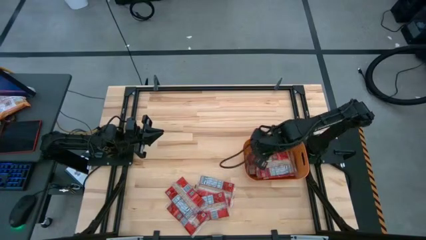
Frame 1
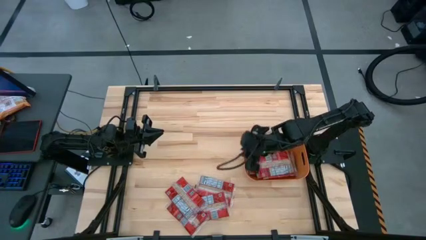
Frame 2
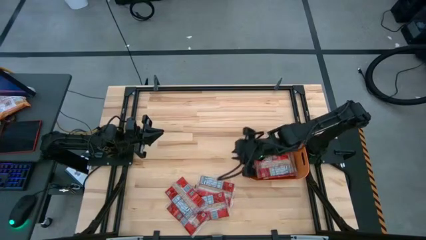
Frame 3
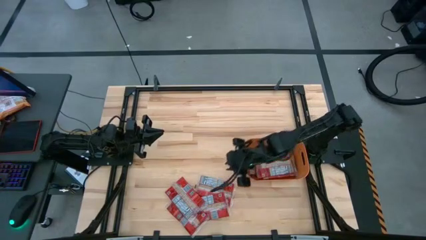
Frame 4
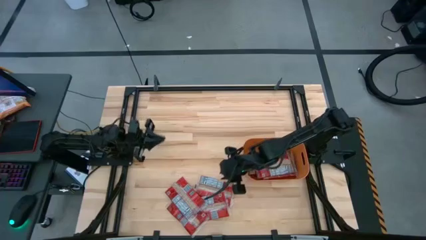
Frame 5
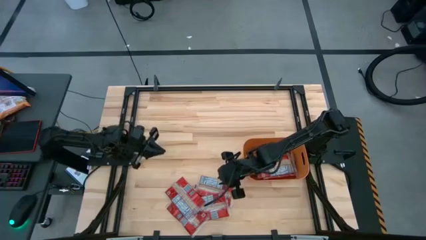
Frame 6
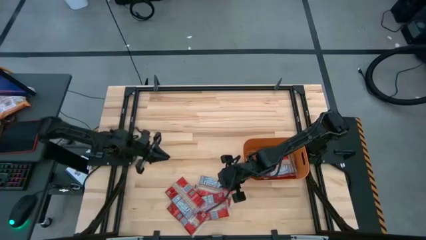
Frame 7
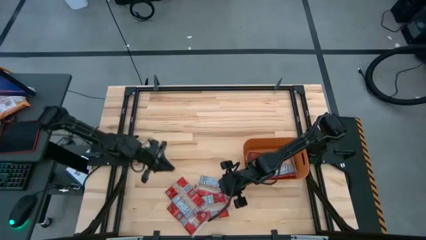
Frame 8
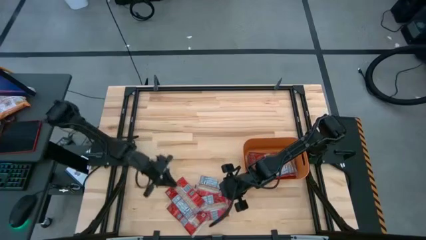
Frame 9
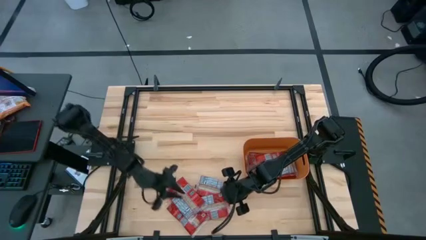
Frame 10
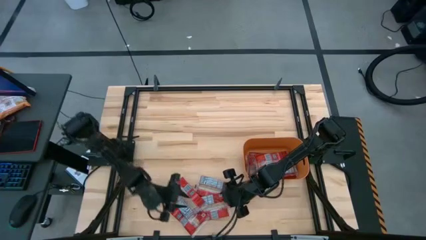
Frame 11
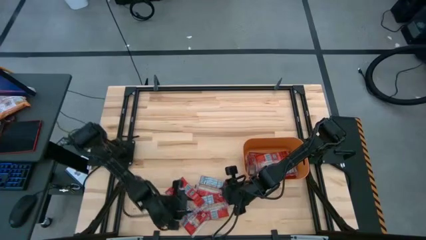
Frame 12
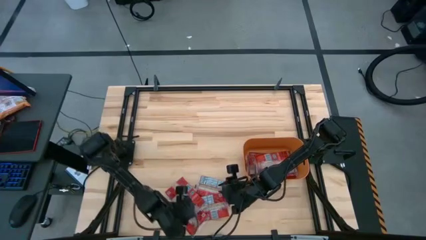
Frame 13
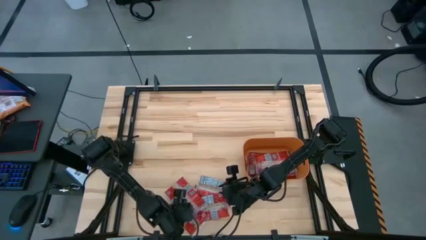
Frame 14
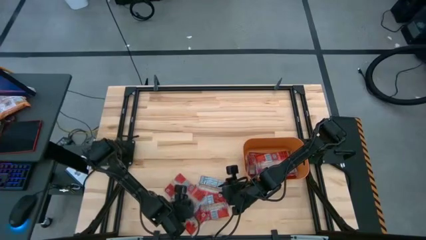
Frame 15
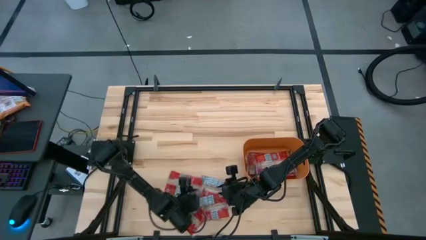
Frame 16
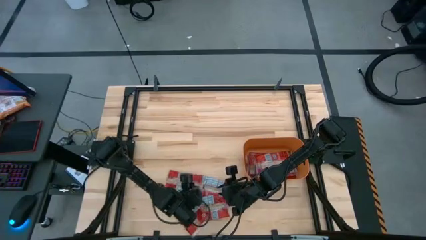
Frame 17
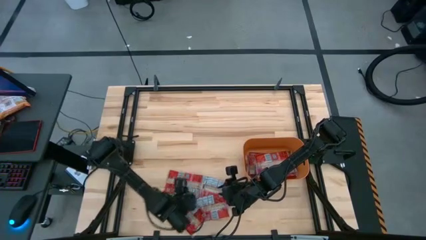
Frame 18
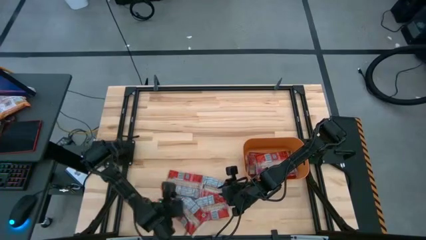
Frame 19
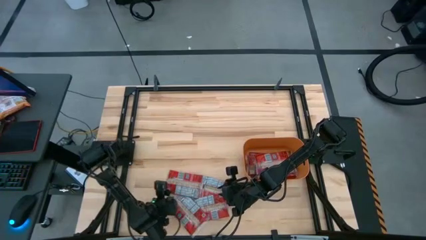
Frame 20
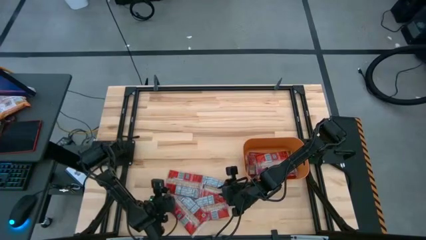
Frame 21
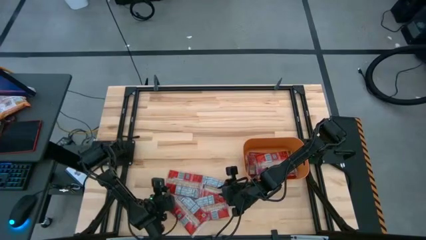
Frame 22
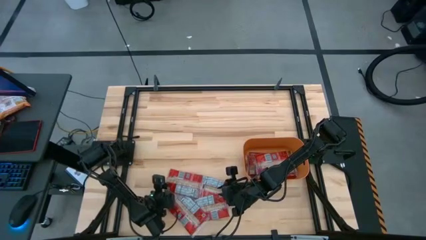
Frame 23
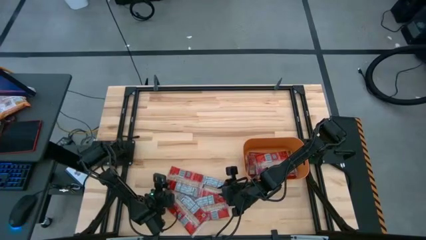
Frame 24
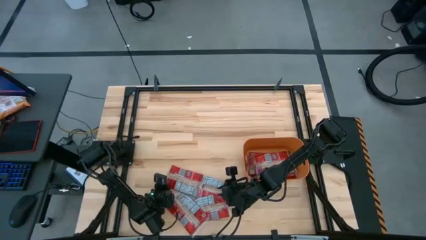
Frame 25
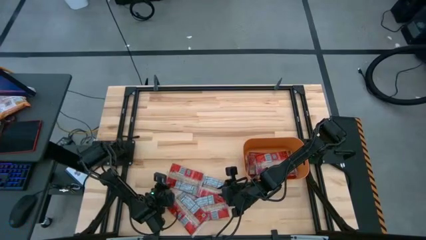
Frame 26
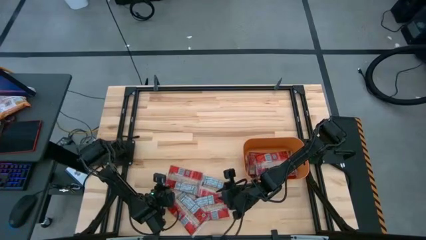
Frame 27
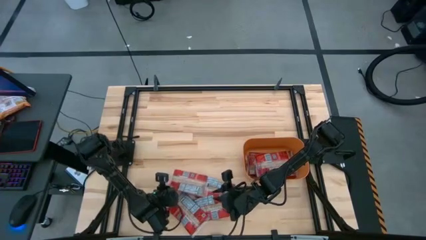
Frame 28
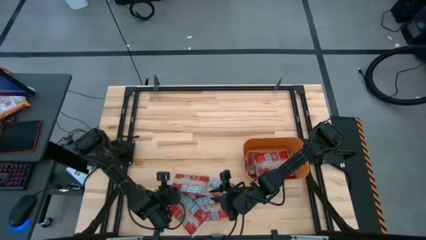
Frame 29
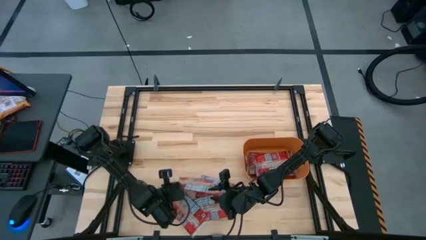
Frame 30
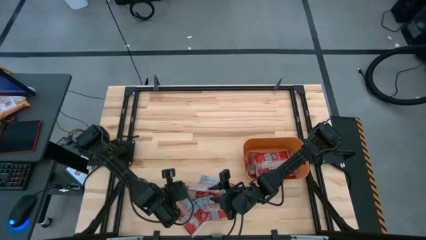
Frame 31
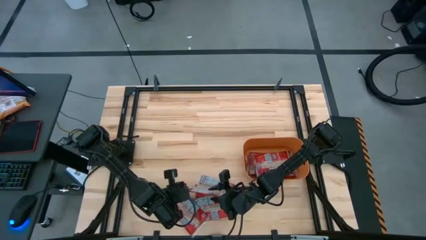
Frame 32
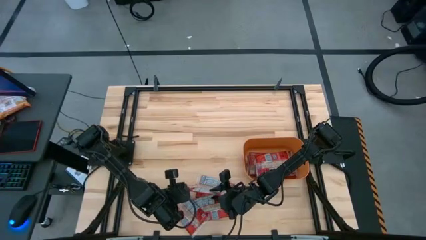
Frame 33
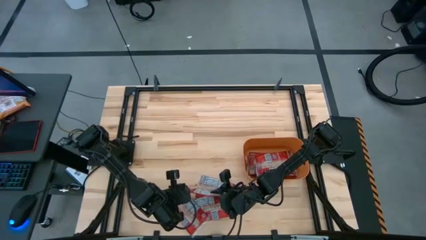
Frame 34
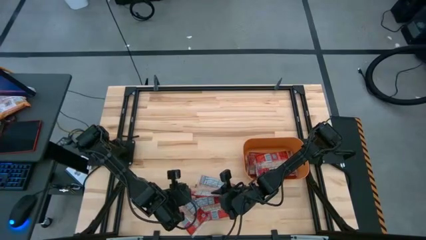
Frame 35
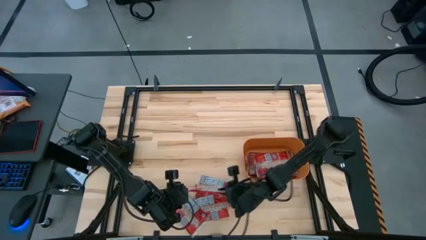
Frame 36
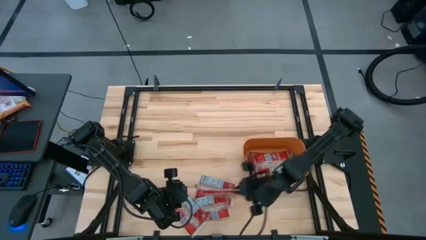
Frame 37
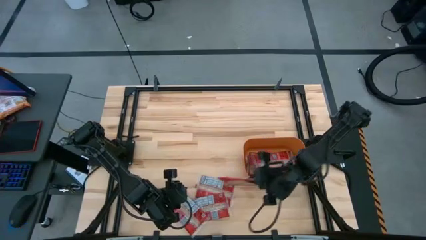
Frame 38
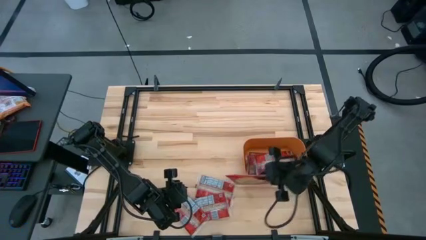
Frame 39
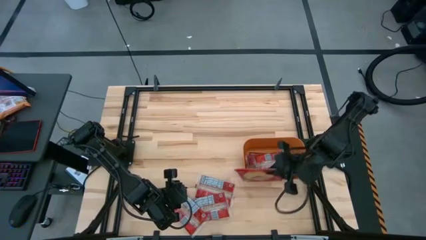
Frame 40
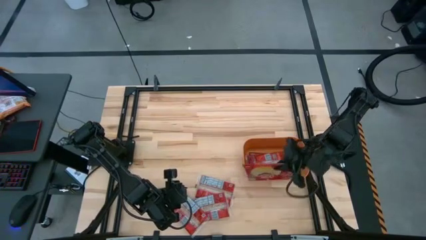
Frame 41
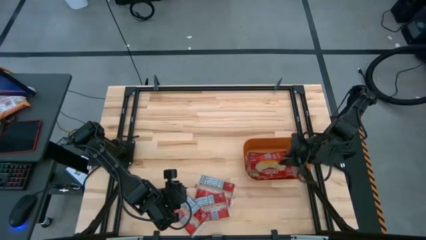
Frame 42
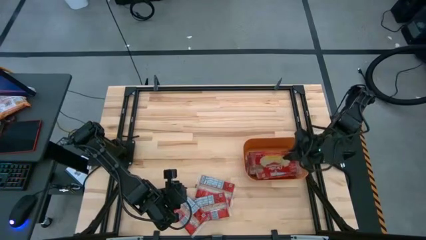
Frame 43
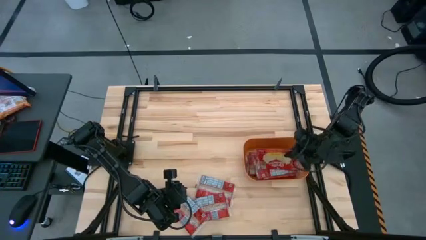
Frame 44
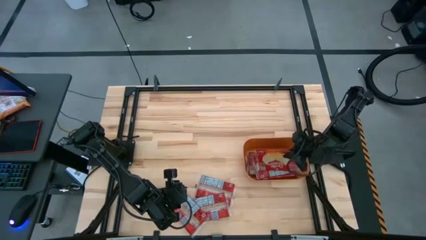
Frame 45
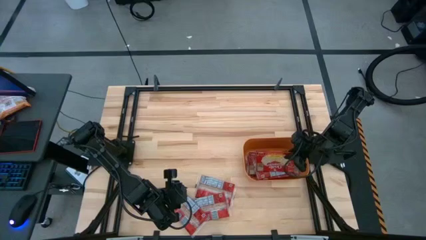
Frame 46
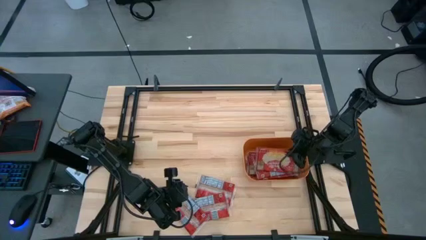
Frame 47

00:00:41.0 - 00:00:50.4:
Task: Sort popcorn bags into baskets
Put the popcorn bag into the orange bin

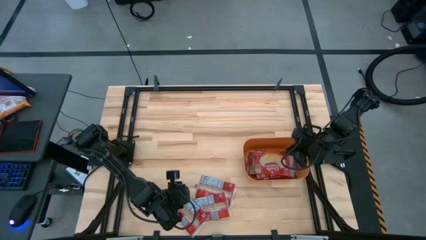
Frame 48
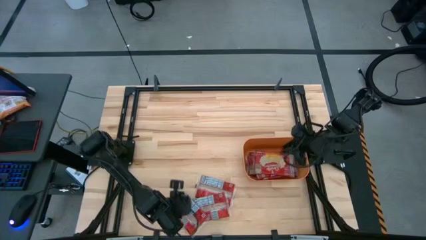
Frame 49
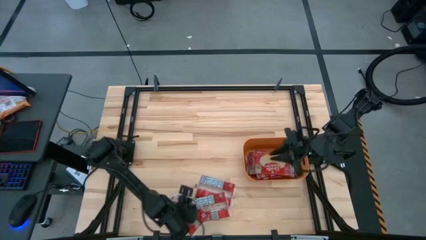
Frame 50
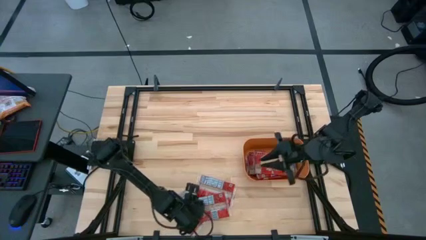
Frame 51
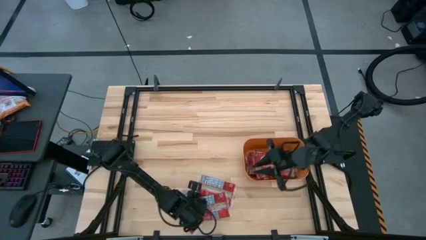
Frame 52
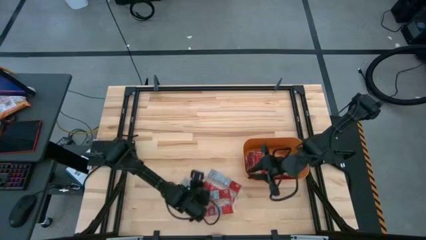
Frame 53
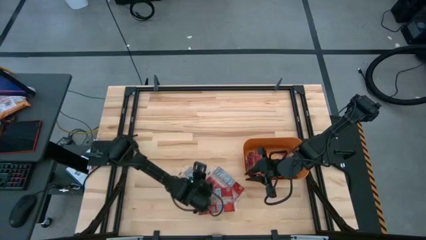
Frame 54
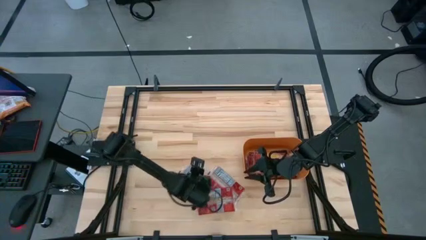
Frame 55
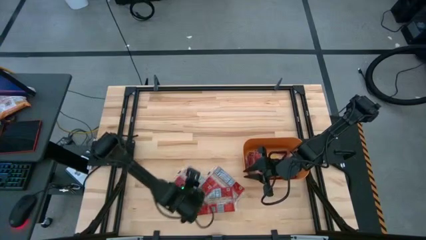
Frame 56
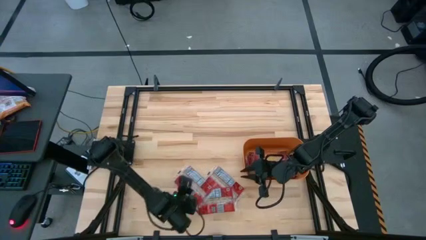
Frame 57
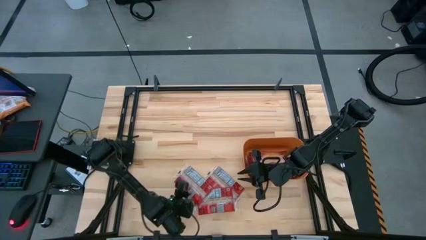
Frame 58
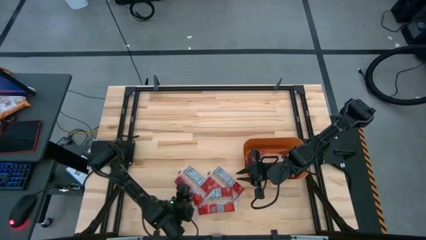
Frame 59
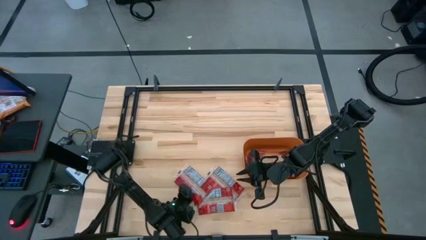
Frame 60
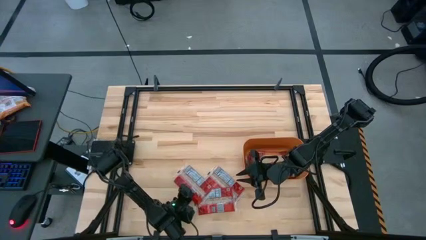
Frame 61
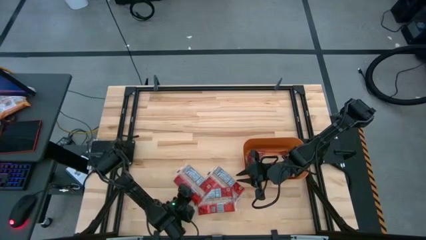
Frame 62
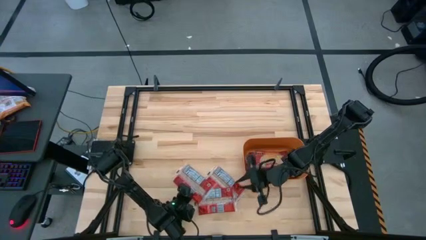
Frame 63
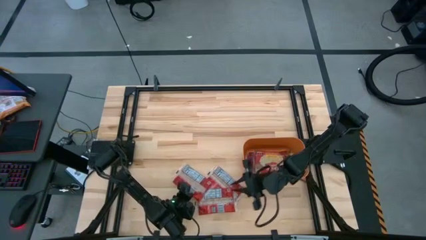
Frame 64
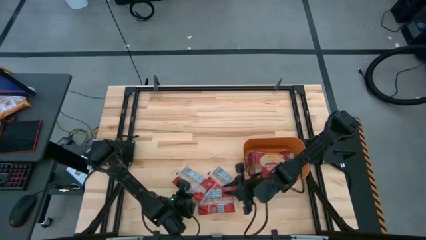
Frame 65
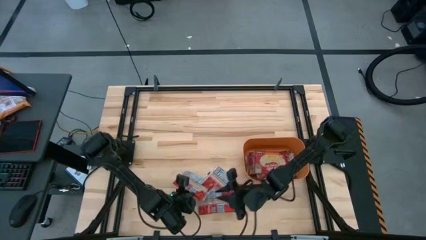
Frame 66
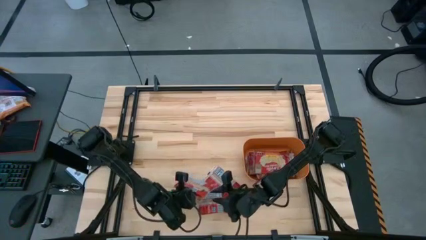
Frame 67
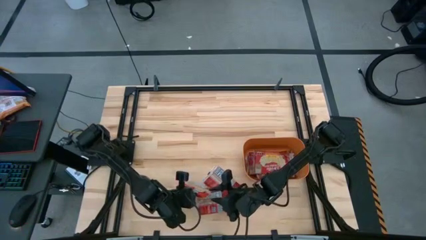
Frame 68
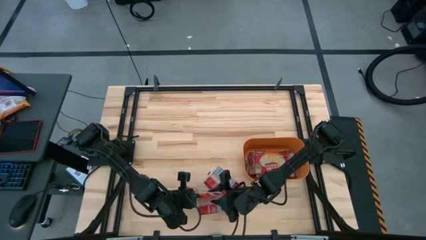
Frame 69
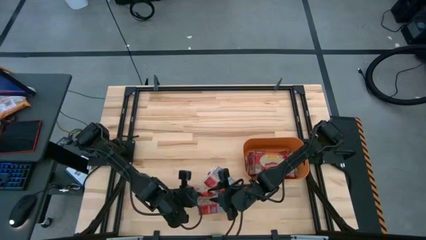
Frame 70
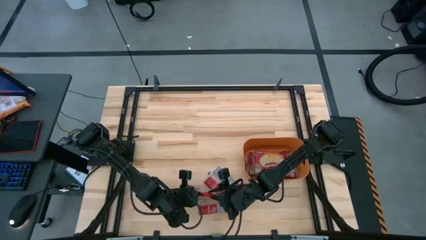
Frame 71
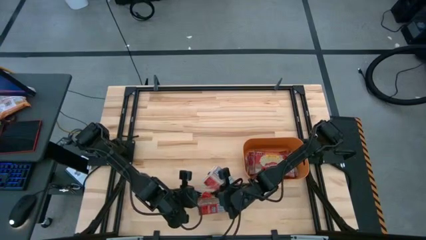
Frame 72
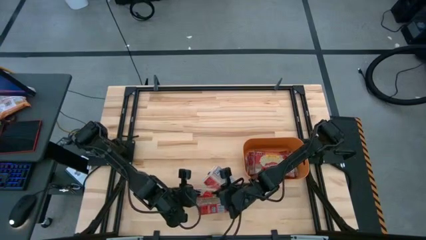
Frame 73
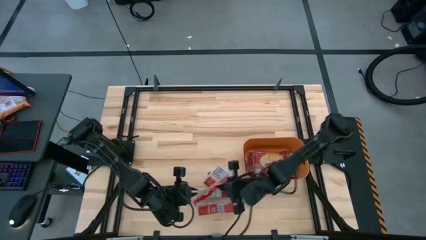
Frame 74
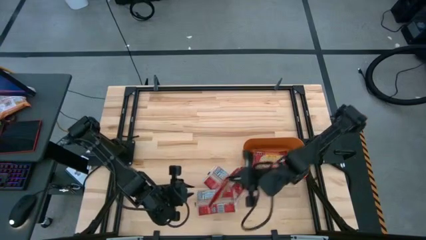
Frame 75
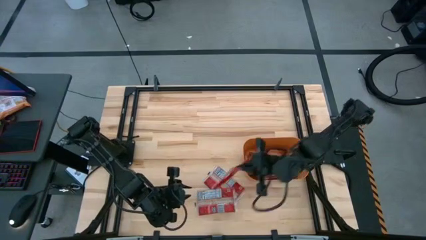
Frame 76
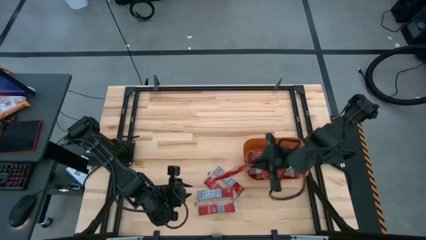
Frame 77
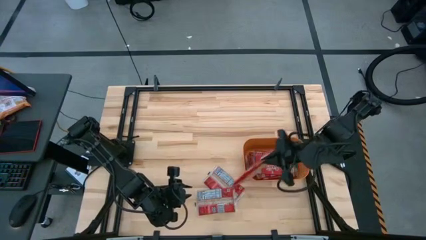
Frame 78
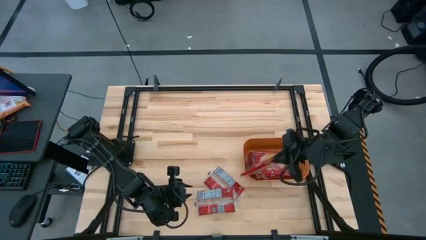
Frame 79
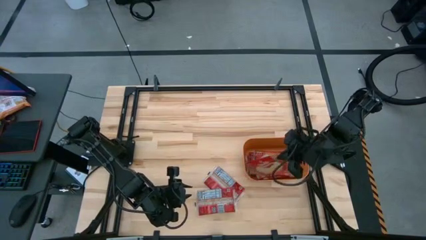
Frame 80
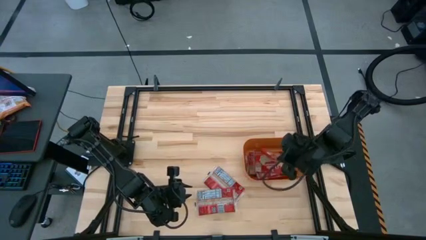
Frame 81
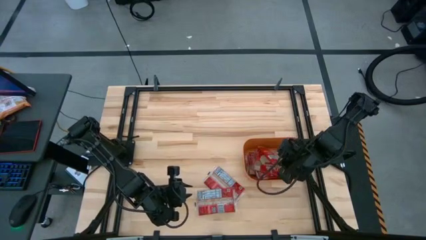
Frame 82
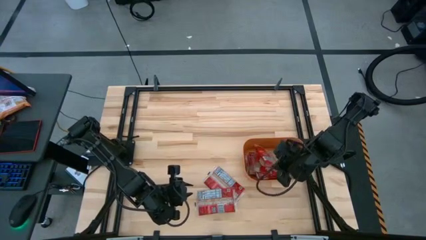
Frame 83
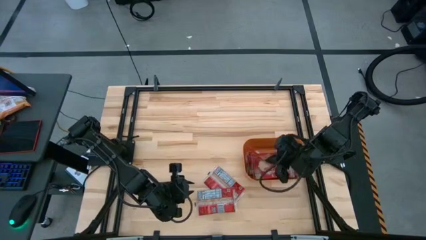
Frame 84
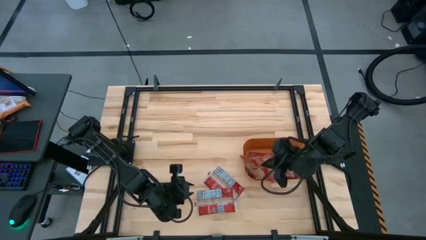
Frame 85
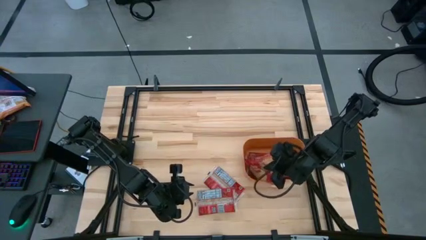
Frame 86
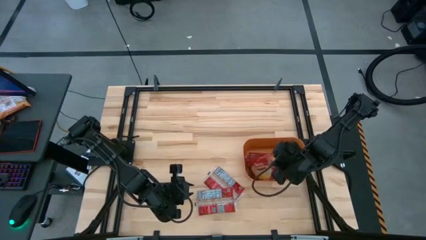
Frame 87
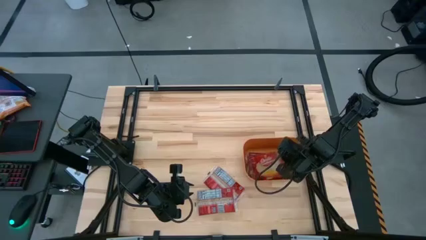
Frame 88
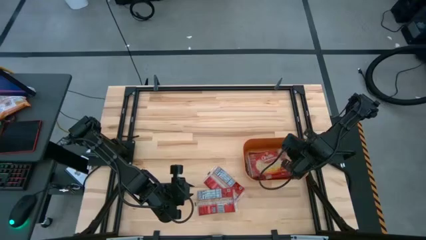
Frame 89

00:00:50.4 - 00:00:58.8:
Put the popcorn bag into the orange bin
